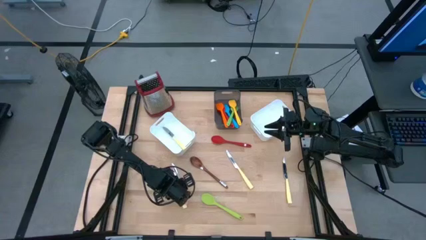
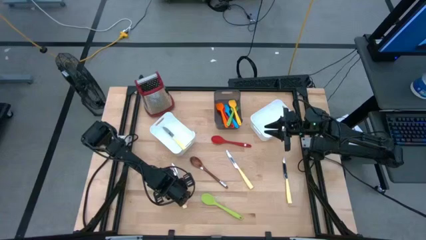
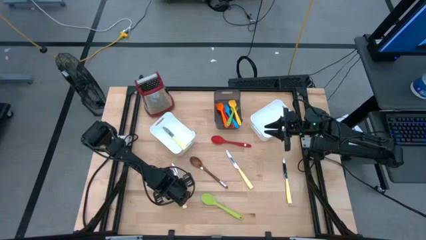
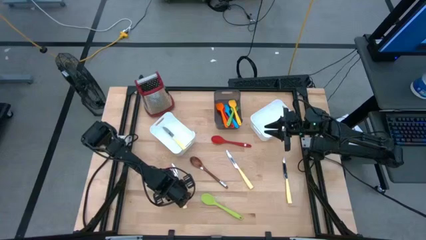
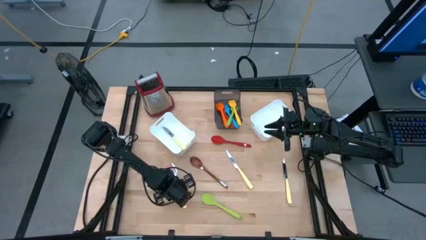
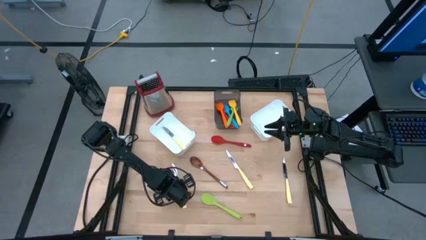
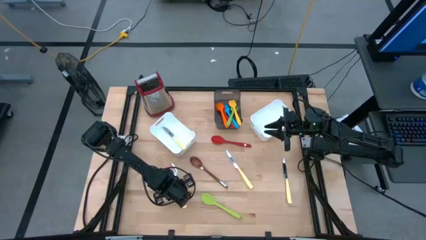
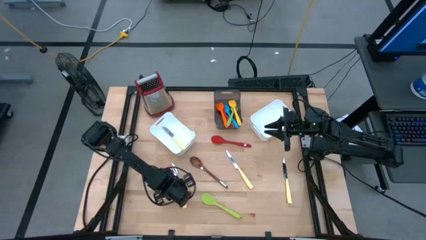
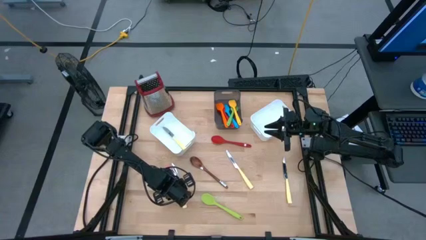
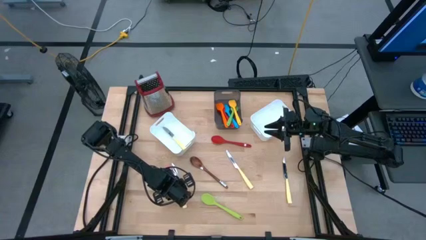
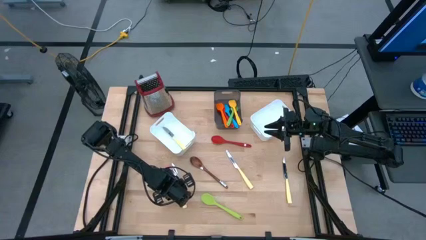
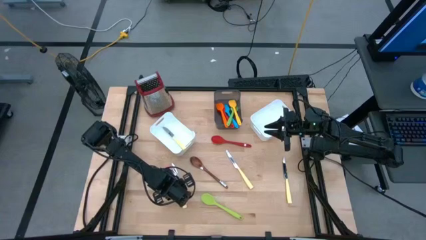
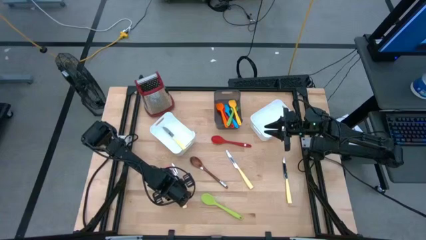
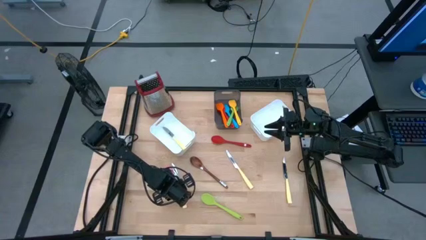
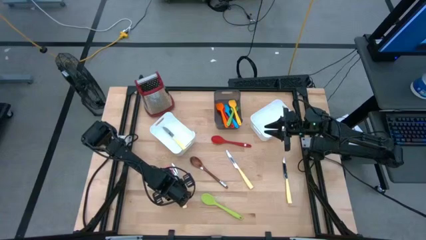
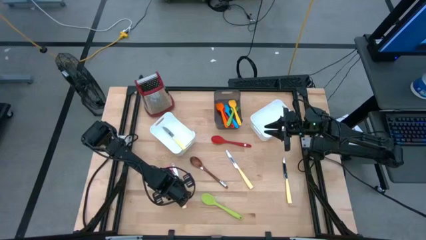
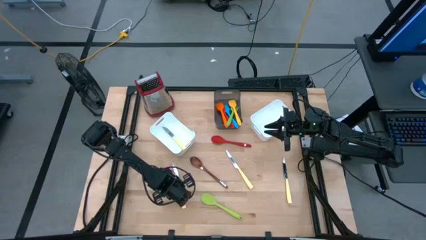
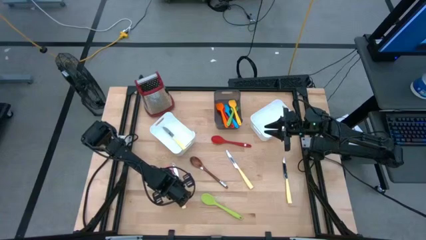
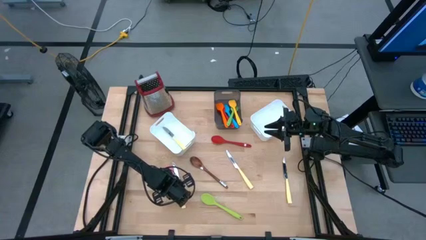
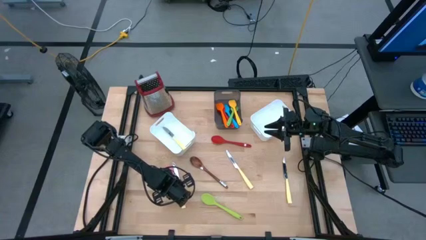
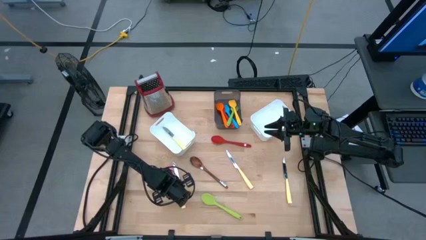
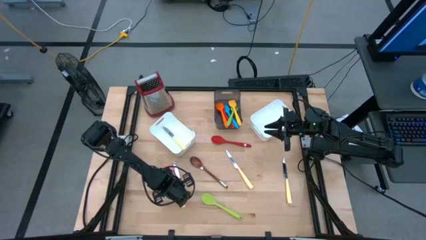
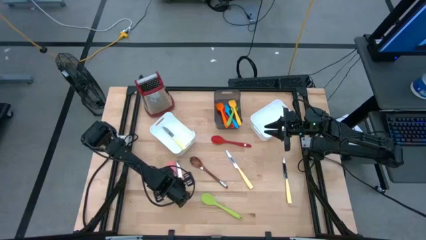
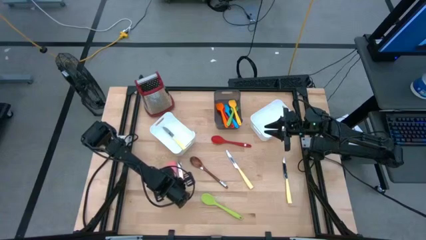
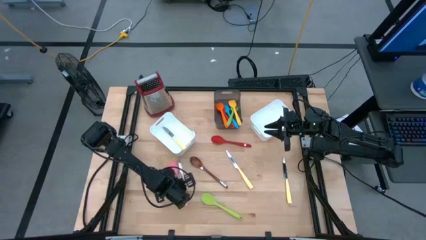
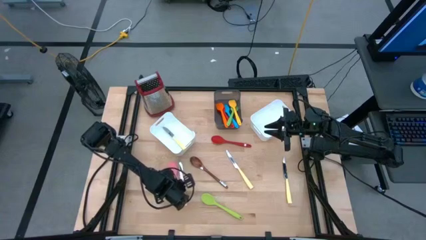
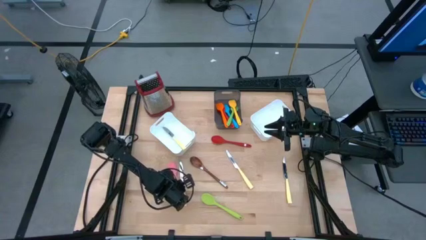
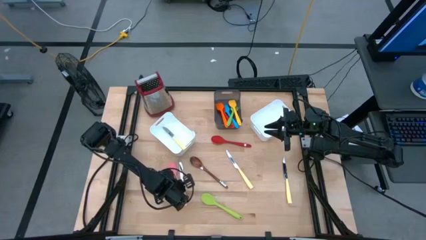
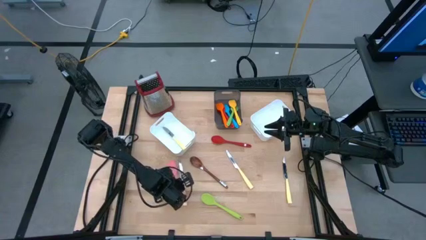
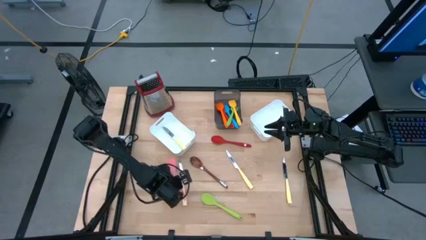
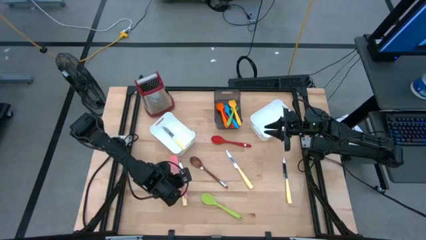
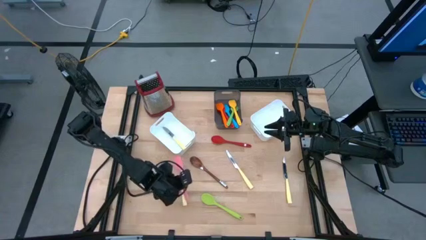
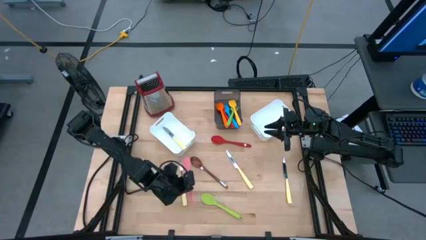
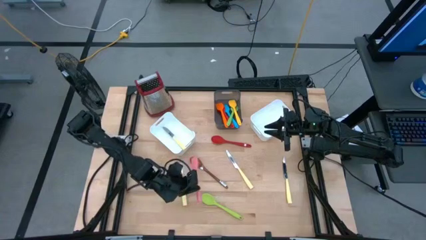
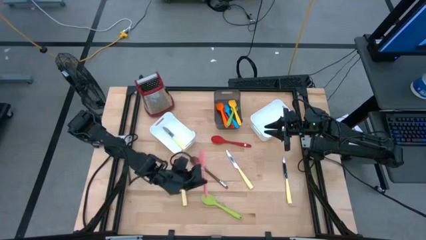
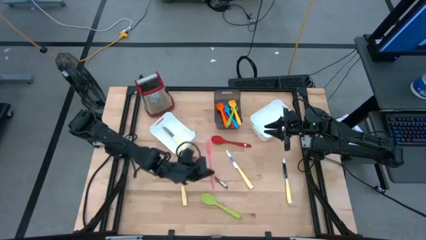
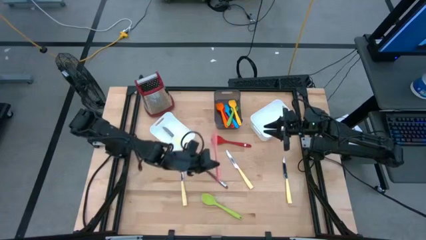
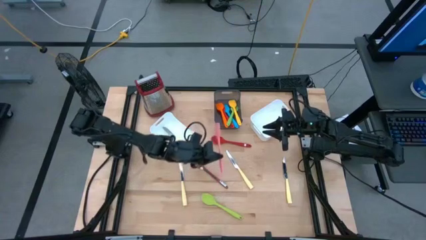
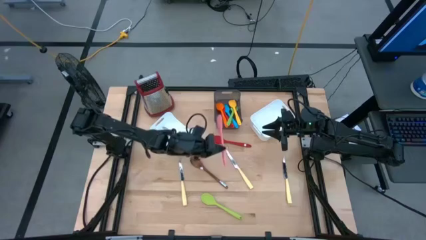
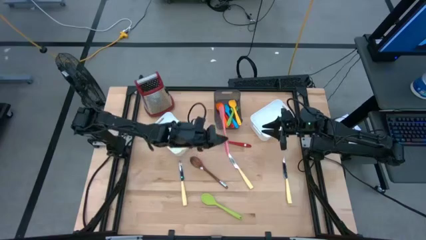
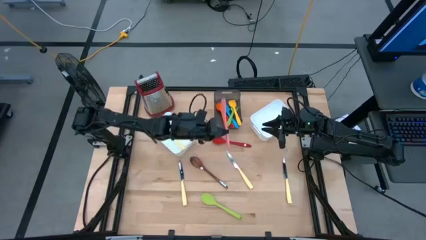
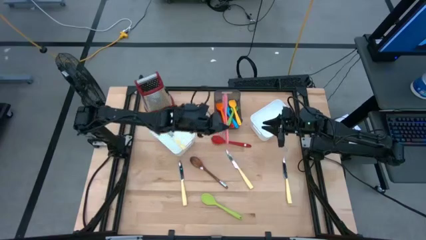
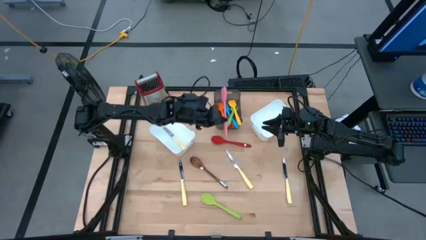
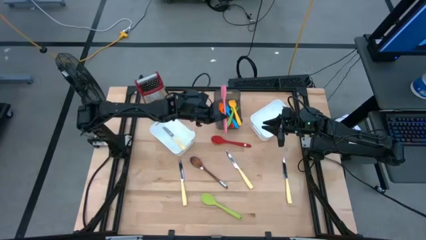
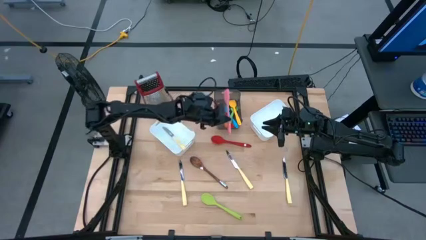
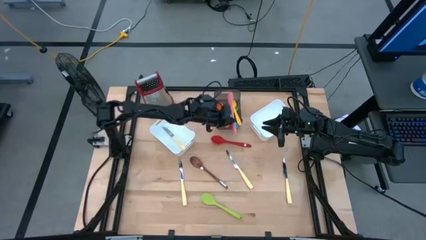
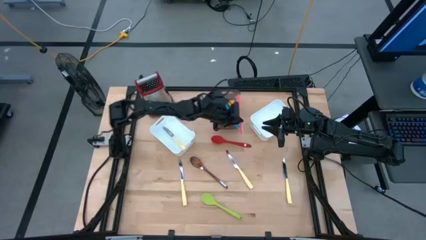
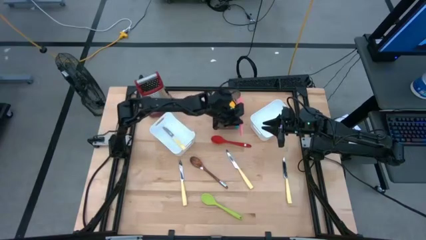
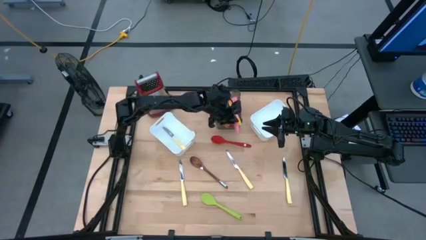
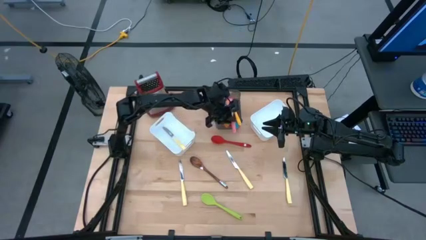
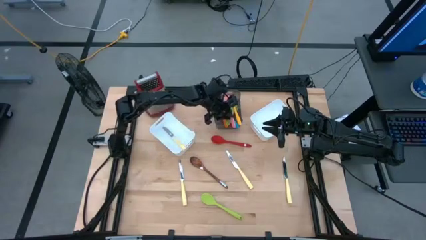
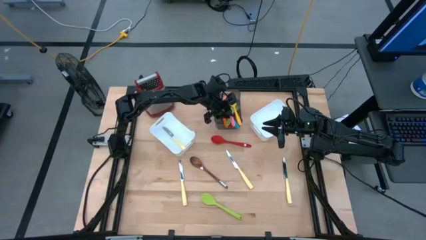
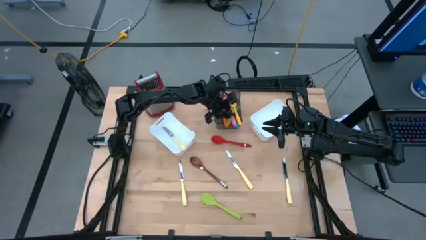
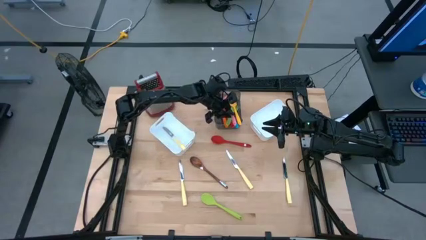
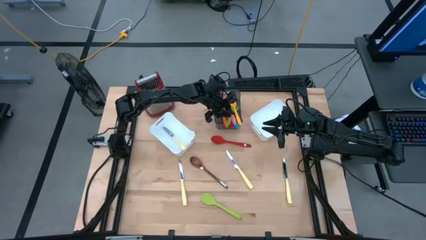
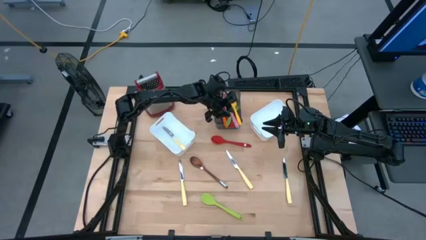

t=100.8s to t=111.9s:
Task: Pick & Place Kitchen Items
Put the pink spatula into the black bin
